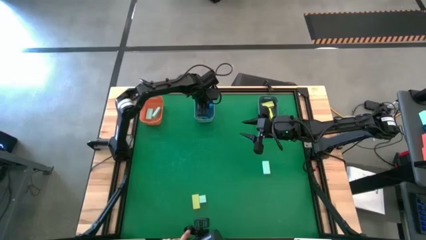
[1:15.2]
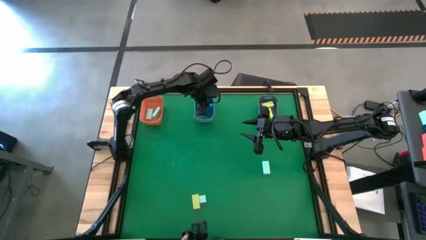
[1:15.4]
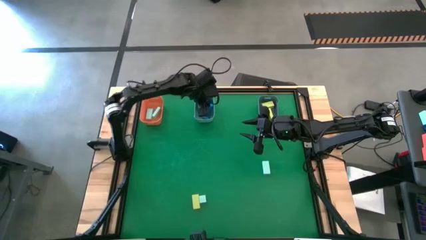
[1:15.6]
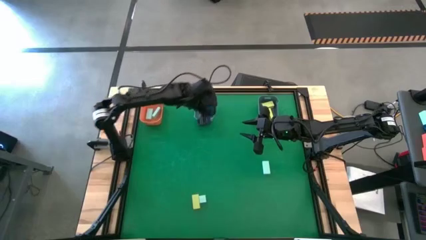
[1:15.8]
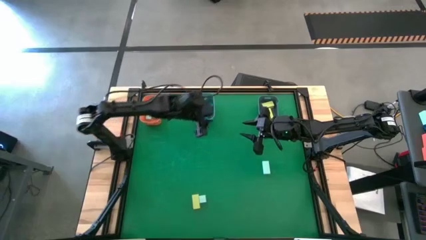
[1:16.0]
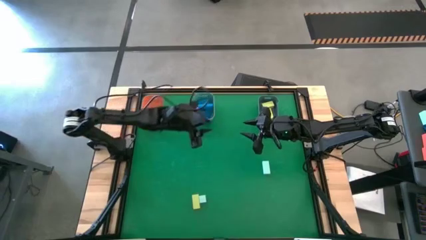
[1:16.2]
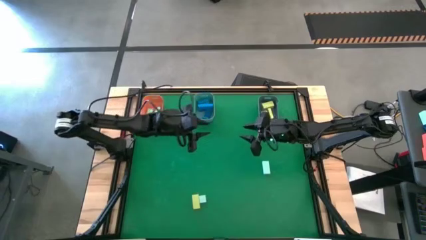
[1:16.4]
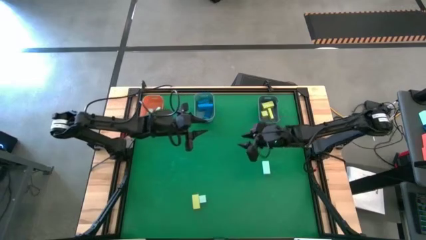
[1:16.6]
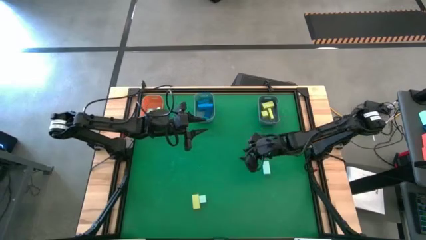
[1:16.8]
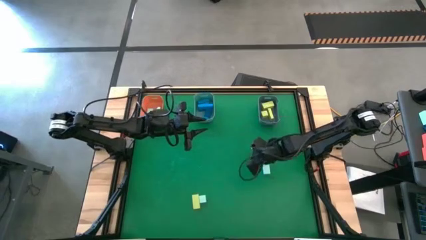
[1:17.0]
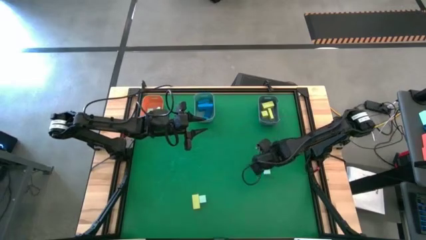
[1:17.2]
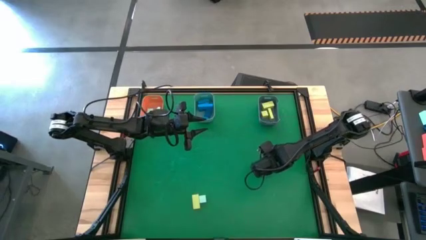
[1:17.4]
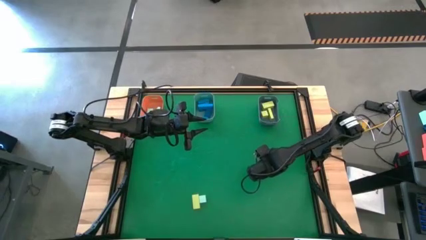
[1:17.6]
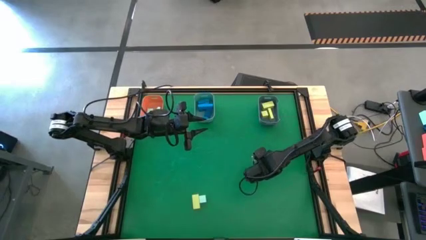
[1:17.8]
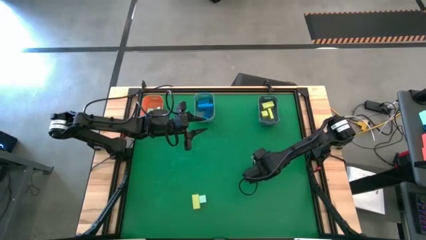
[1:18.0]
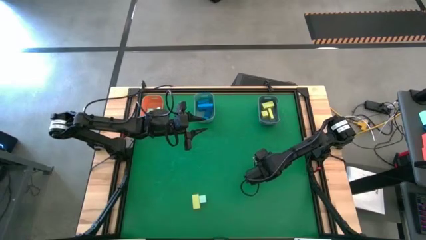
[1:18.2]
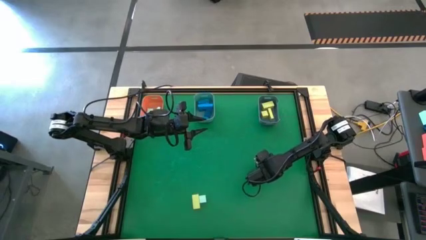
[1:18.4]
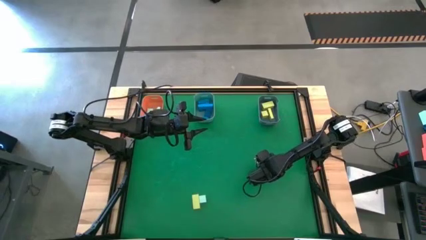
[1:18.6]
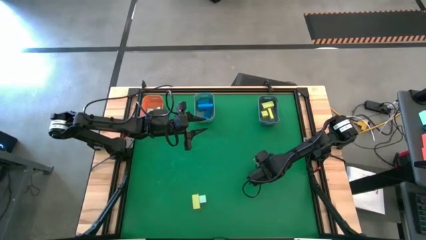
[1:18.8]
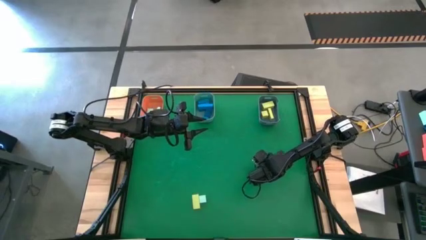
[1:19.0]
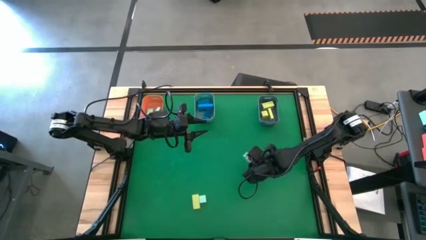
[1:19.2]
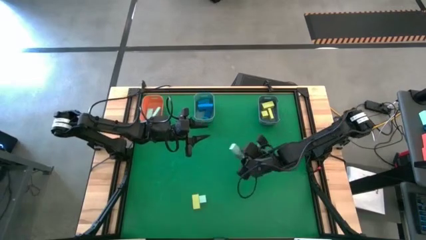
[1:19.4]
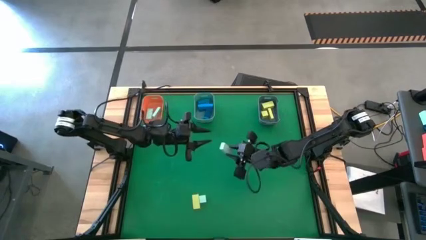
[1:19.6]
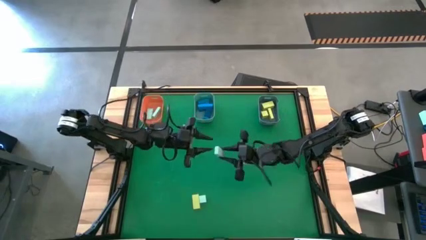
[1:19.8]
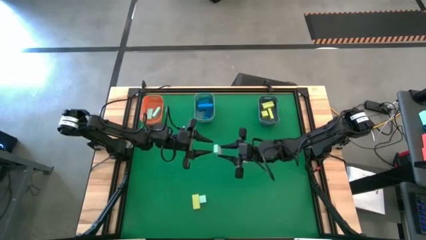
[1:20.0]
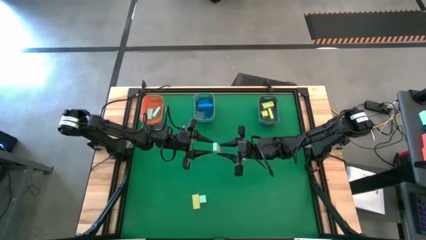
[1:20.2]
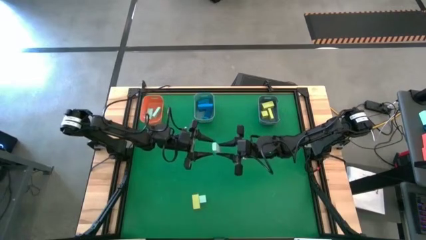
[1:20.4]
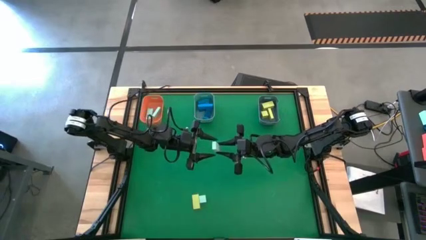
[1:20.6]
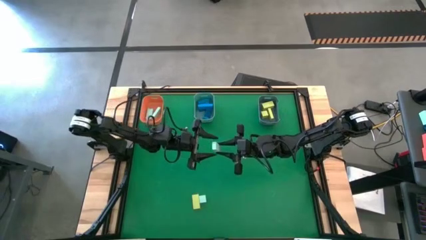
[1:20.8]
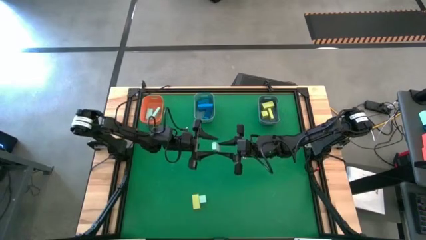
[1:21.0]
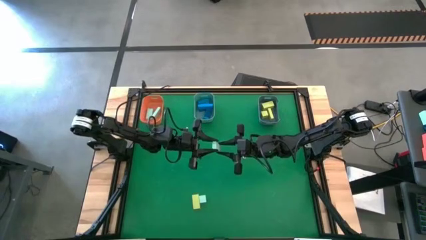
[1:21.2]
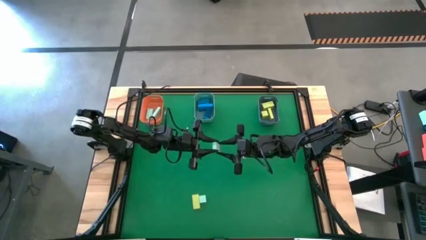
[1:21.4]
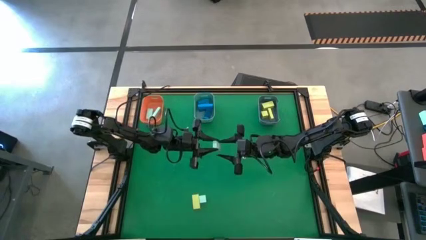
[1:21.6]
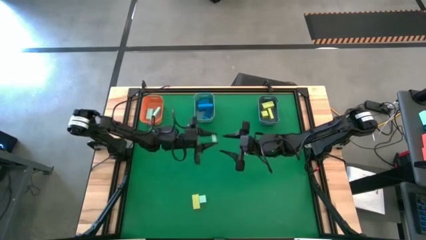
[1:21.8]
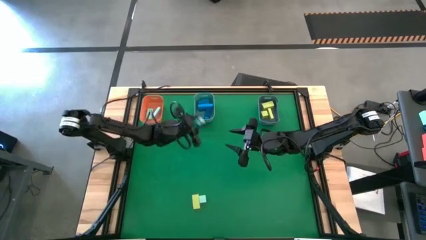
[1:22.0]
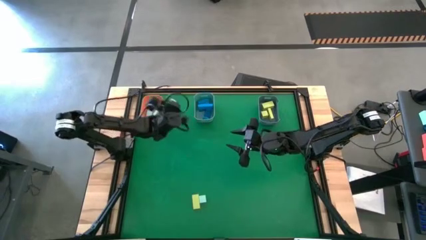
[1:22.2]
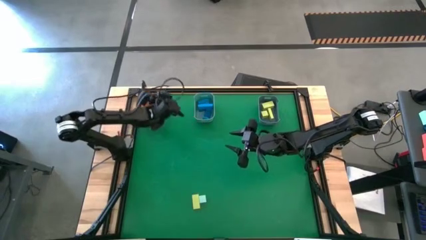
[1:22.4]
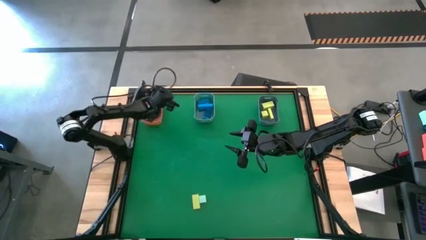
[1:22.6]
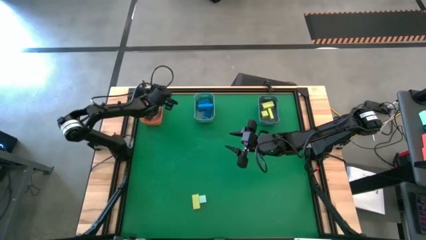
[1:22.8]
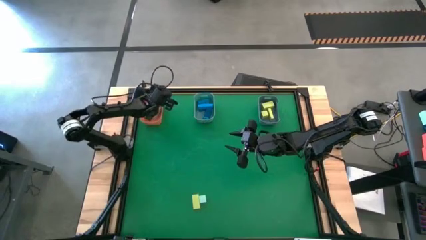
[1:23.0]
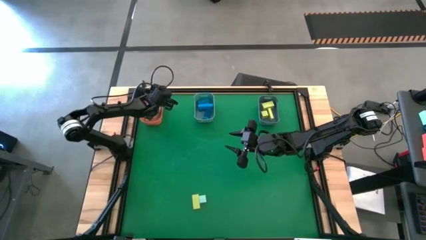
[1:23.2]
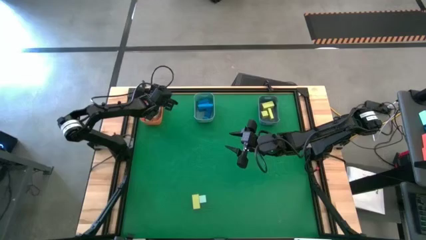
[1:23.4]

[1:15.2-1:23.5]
Task: Sort & place blocks by color
Put the light blue block into the orange bin

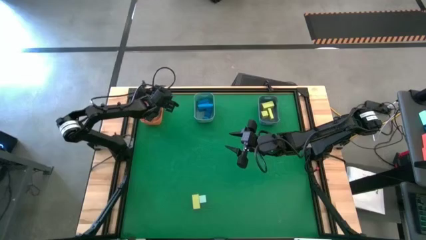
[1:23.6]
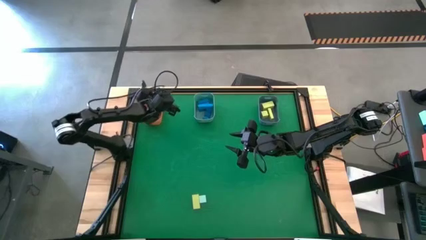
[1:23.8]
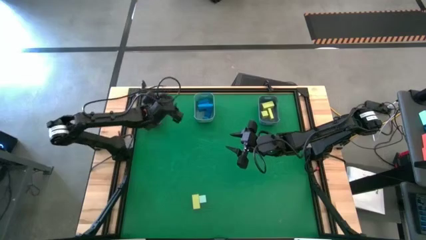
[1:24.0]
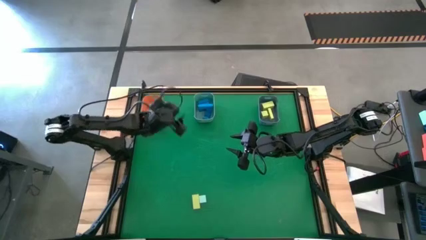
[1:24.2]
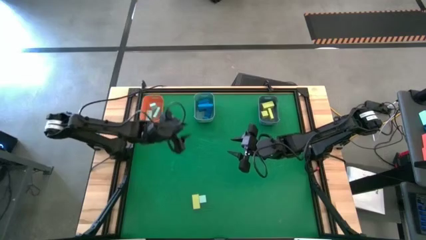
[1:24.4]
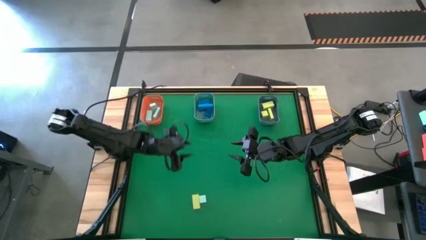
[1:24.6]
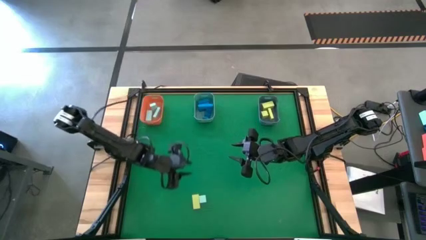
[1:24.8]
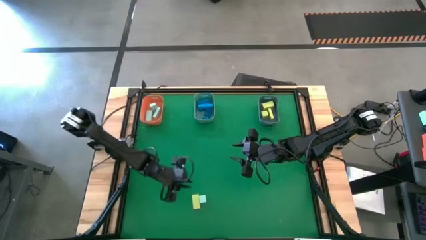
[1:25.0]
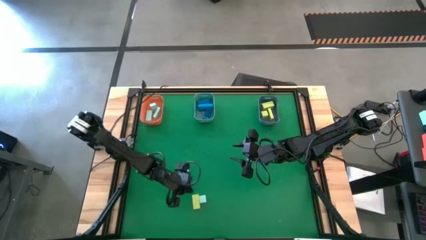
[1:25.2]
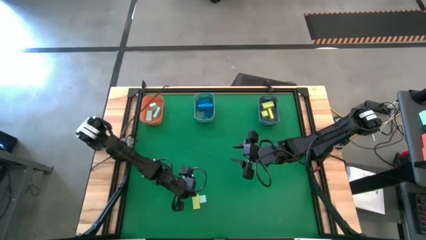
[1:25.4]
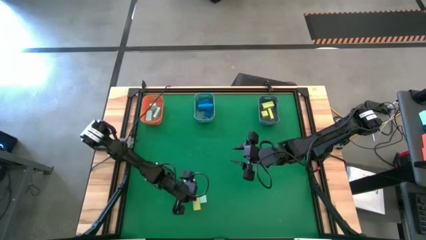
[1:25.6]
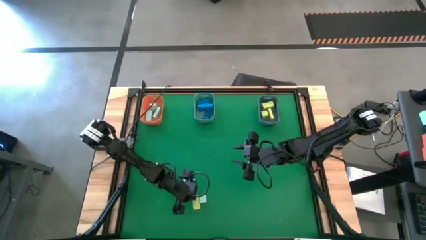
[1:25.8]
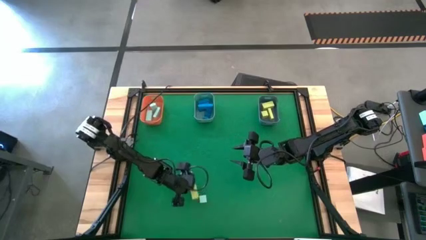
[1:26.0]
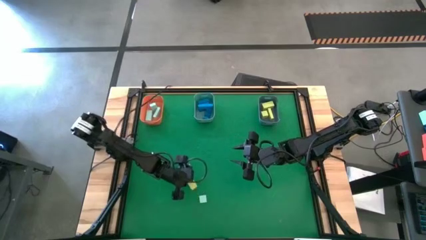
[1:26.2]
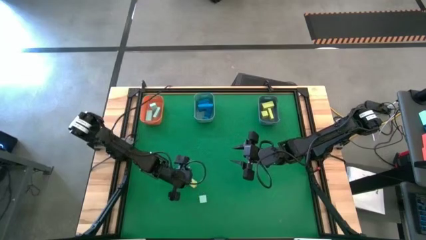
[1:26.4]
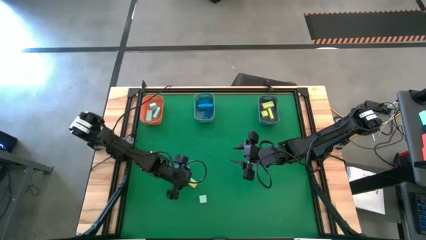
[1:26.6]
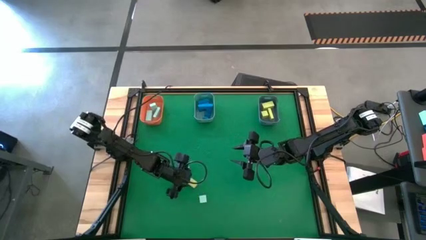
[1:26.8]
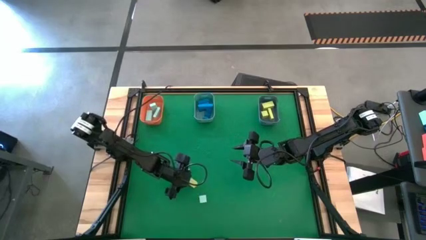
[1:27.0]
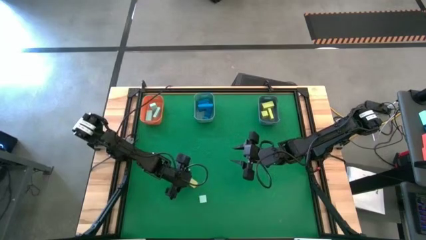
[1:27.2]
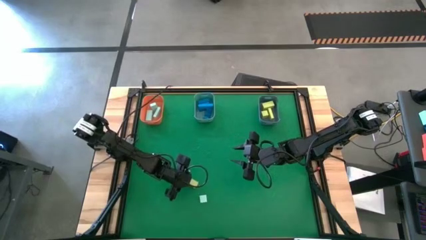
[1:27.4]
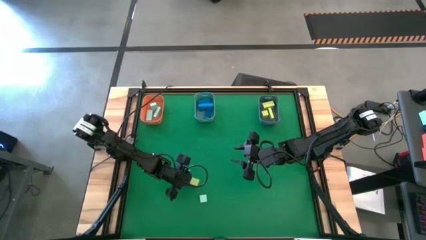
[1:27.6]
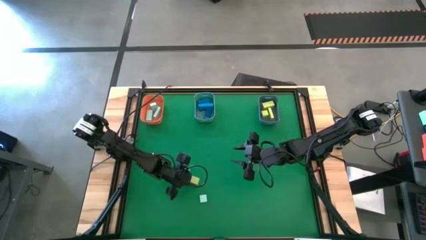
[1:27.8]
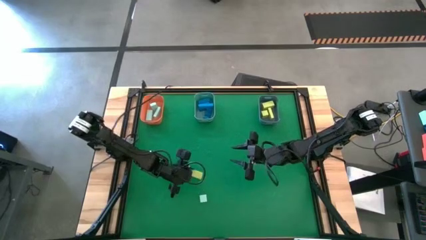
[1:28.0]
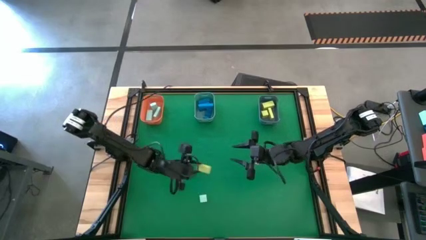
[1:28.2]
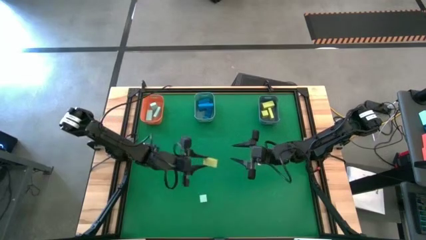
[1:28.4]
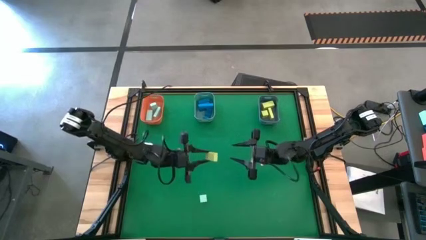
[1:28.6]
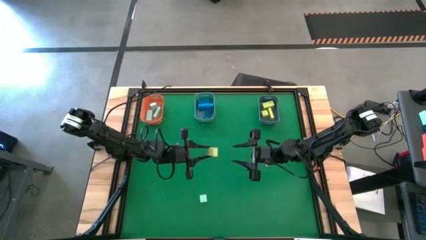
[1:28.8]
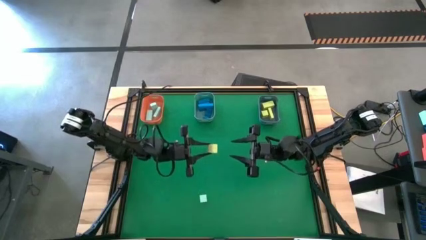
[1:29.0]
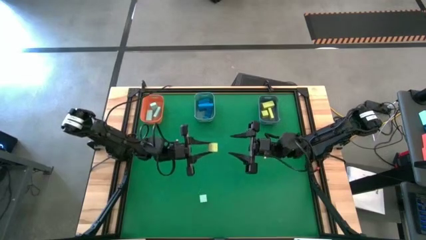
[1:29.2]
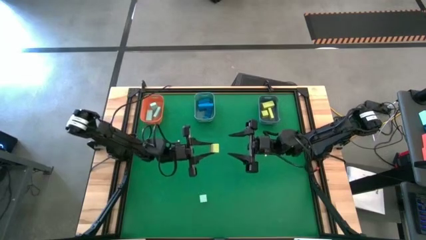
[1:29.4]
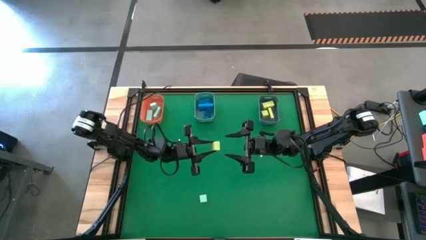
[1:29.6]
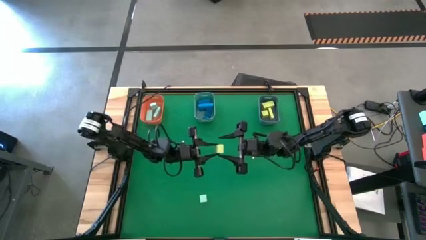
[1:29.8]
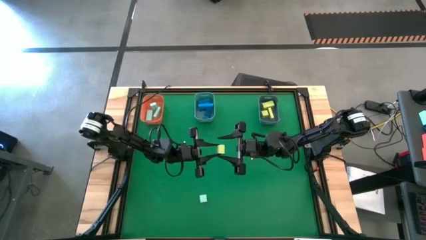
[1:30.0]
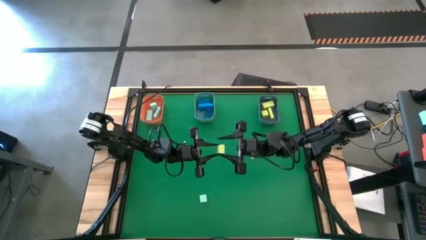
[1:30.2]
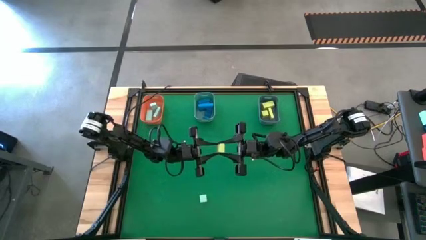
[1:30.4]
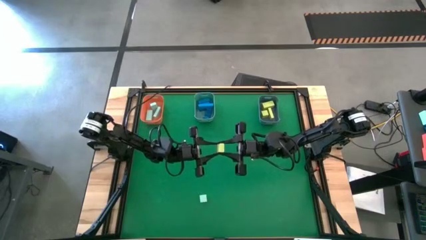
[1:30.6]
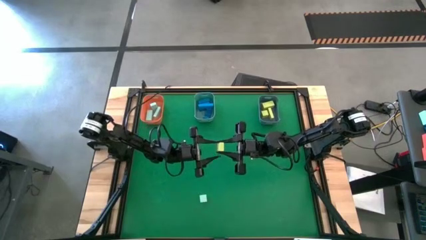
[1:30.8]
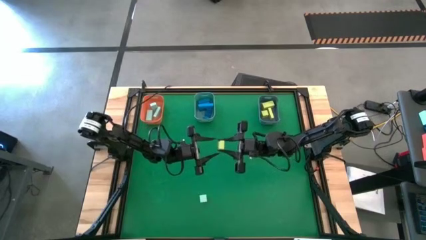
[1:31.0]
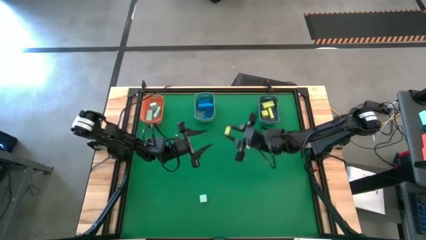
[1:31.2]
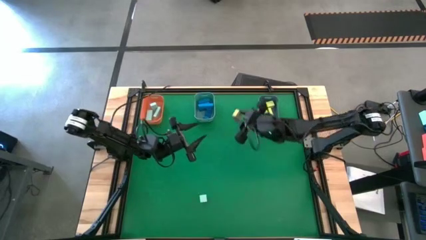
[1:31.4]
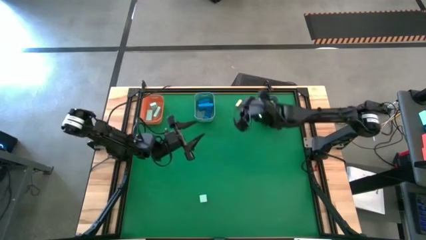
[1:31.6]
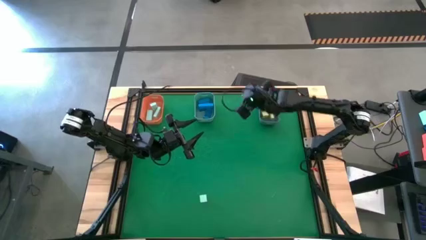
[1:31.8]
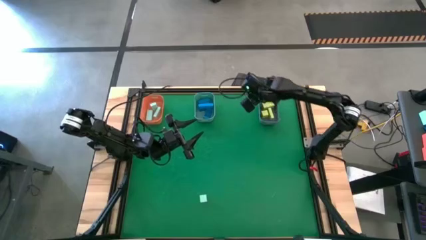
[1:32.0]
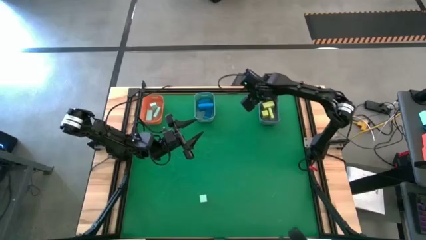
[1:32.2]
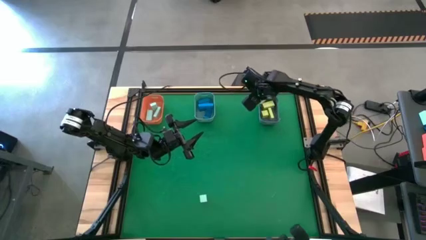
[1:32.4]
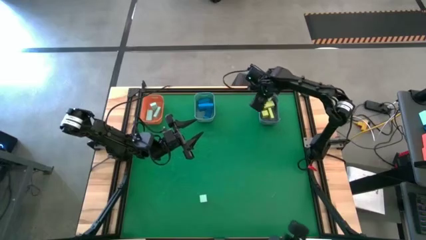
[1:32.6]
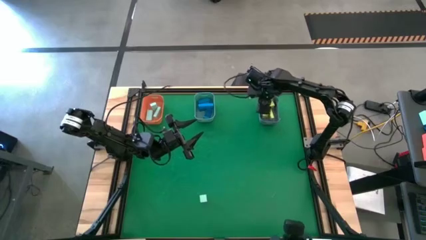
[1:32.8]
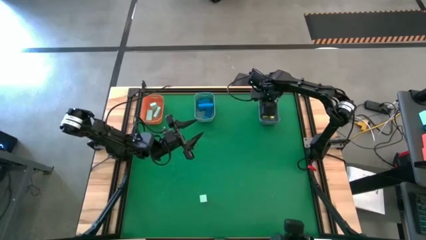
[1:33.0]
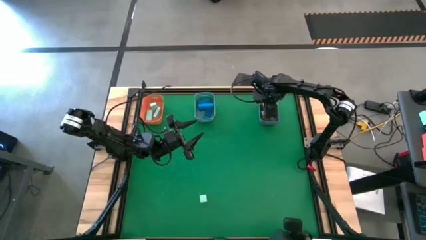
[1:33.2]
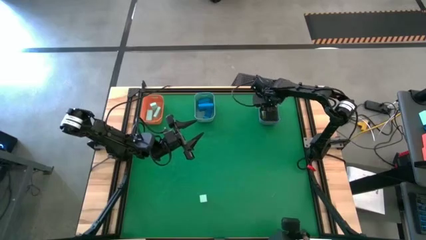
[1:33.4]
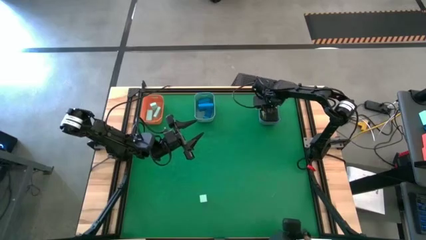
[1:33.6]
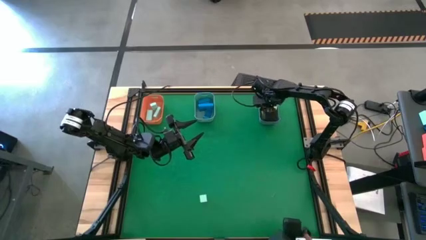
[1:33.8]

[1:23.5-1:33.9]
Put the yellow block into the gray bin
